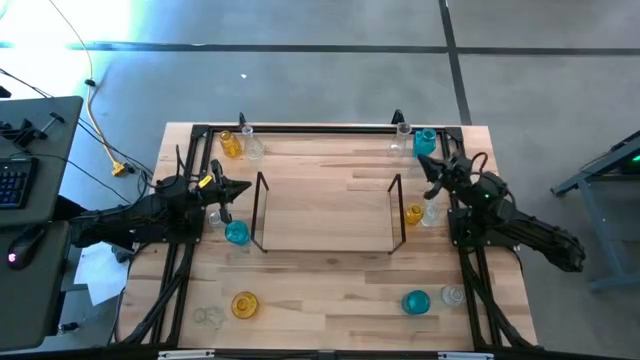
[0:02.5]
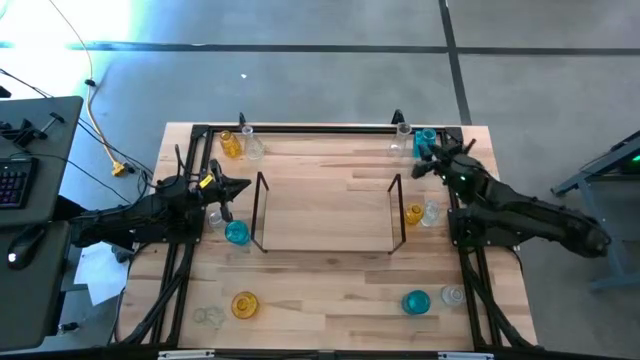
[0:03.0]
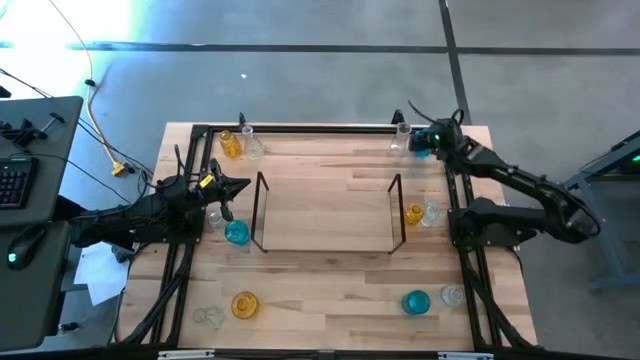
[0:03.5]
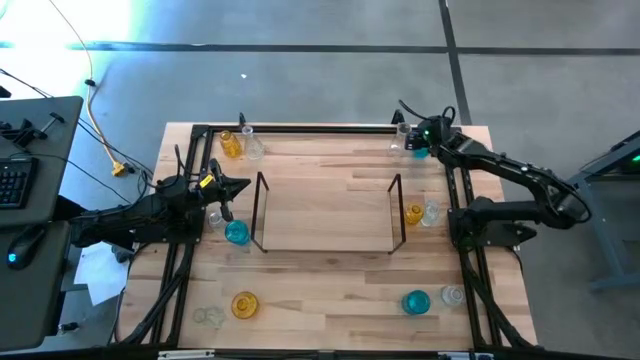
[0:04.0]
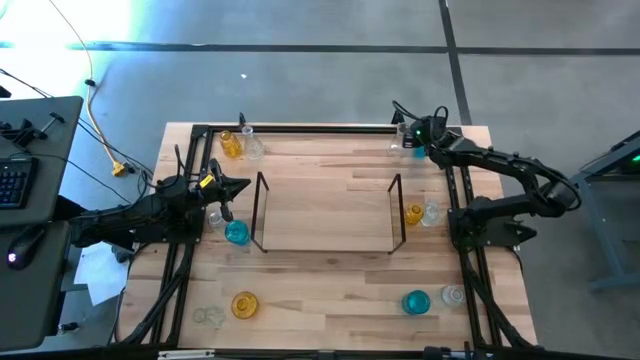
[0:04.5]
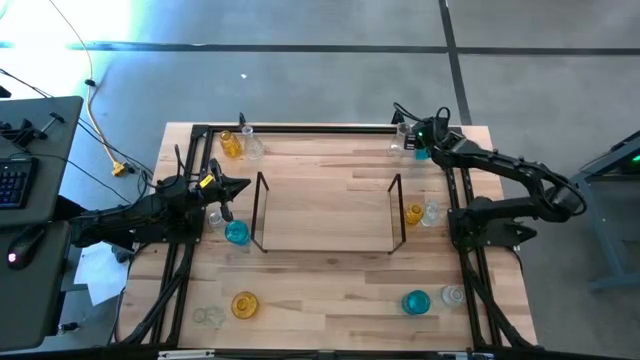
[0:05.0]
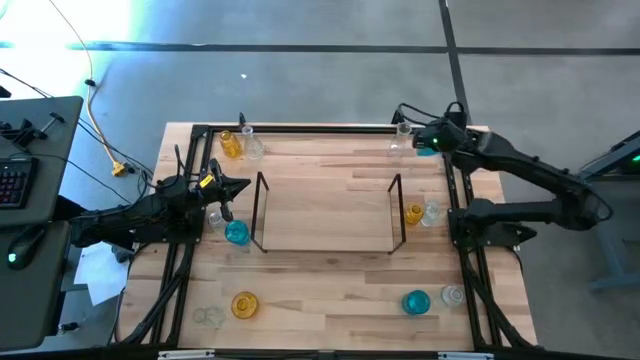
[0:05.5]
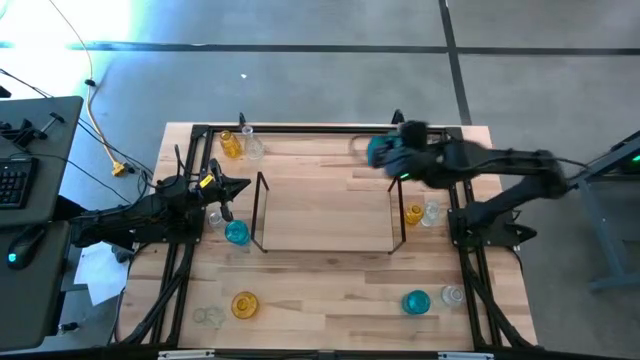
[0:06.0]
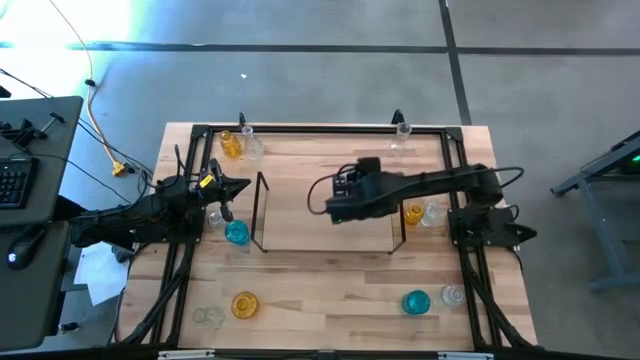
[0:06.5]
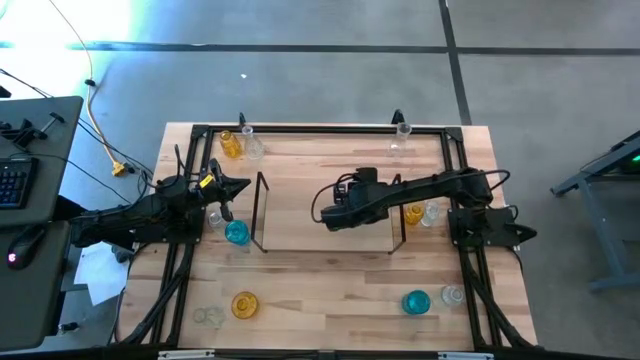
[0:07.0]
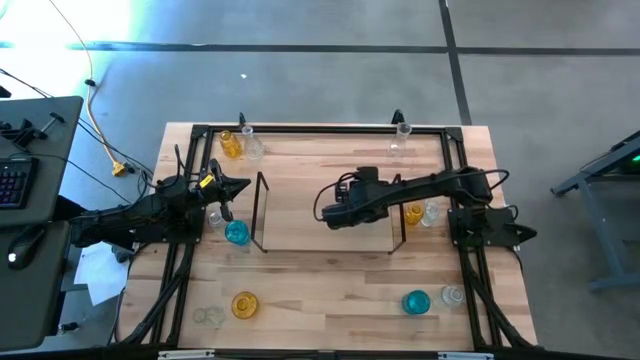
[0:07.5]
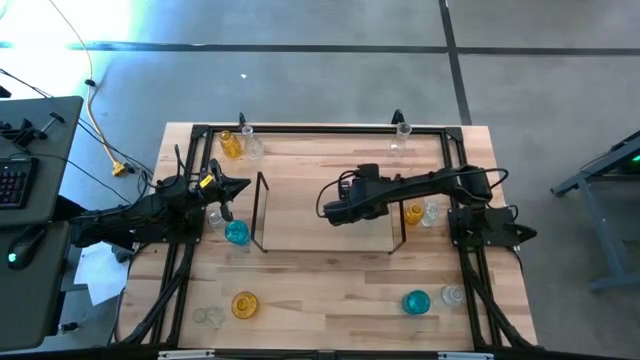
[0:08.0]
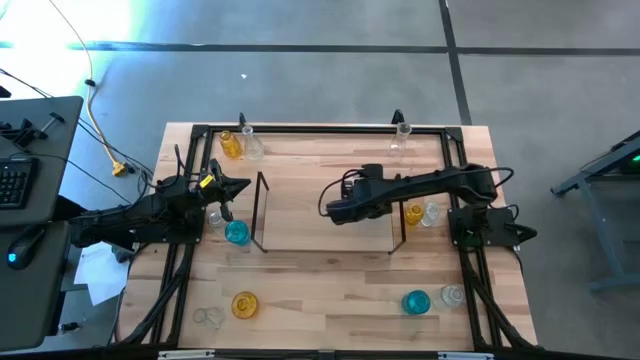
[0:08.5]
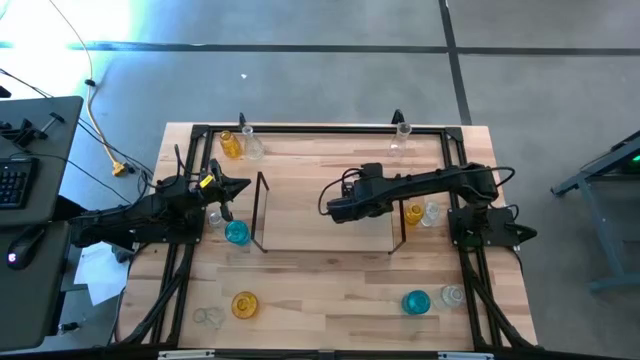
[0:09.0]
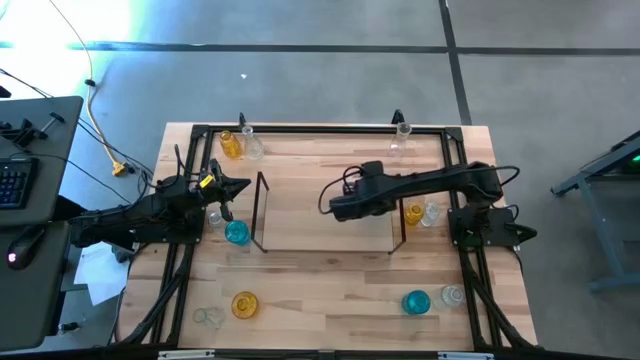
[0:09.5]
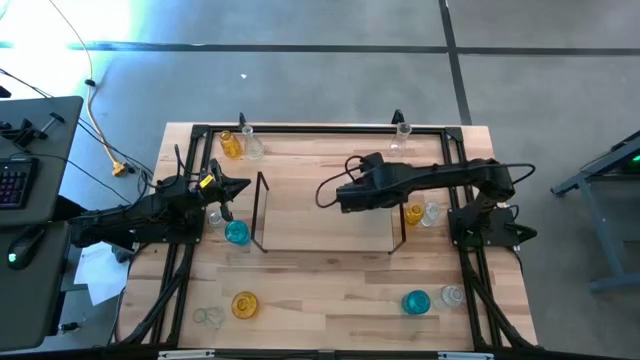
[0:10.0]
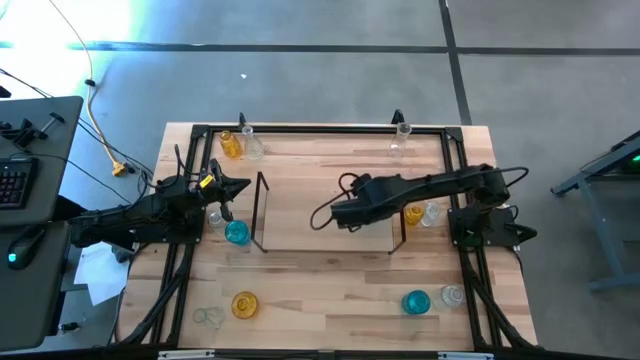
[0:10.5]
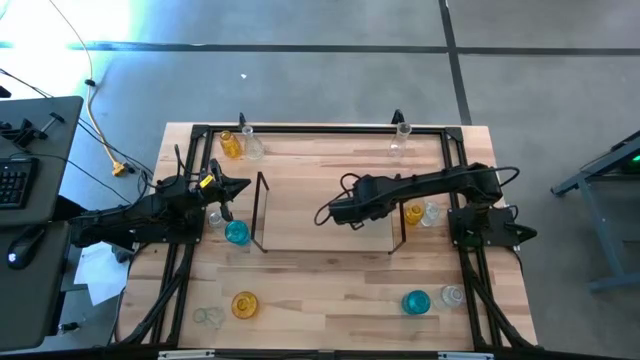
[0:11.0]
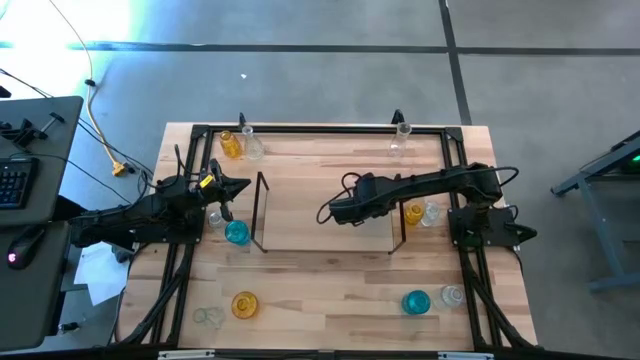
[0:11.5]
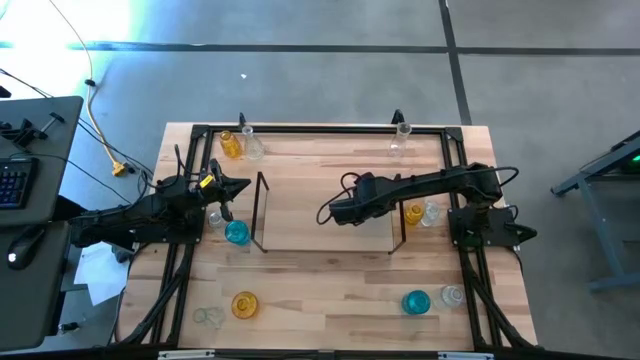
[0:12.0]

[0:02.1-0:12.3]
Task: sort vases onto shelf
Put the blue vase on the shelf

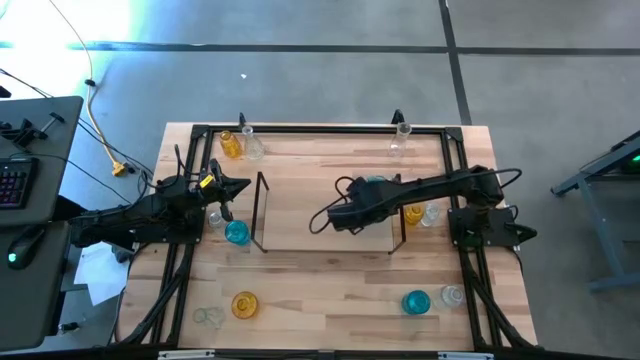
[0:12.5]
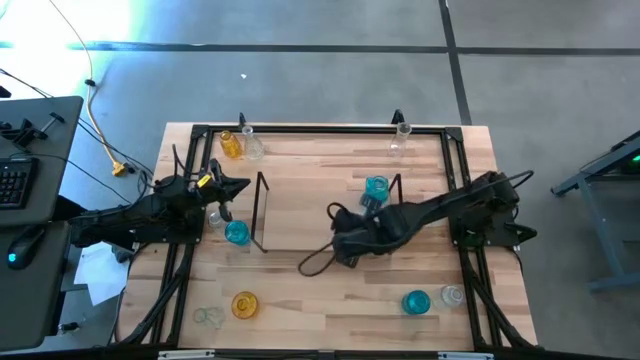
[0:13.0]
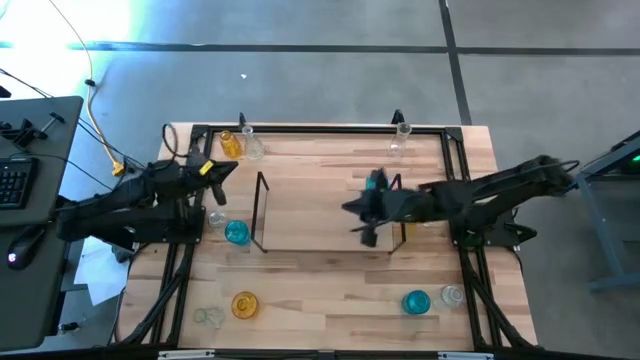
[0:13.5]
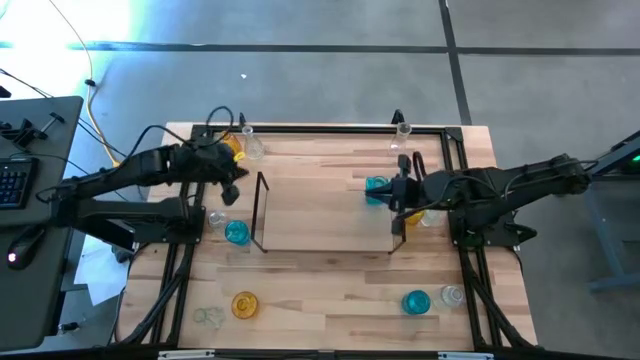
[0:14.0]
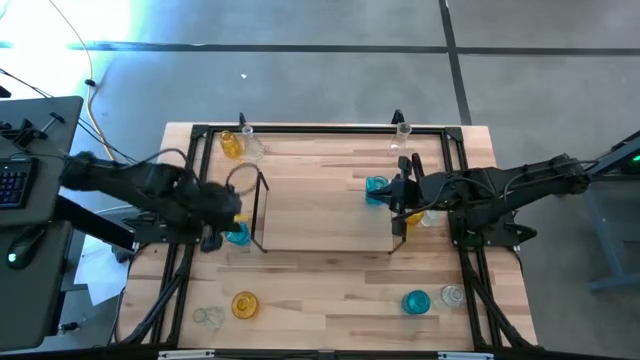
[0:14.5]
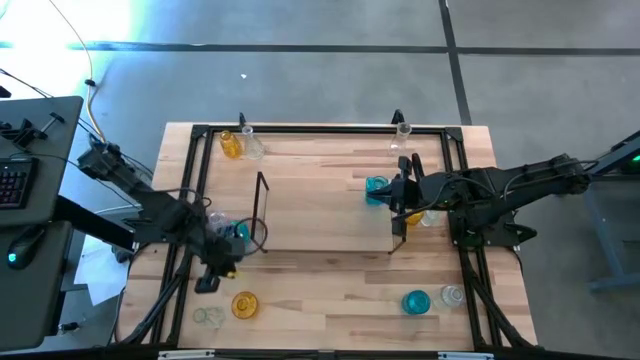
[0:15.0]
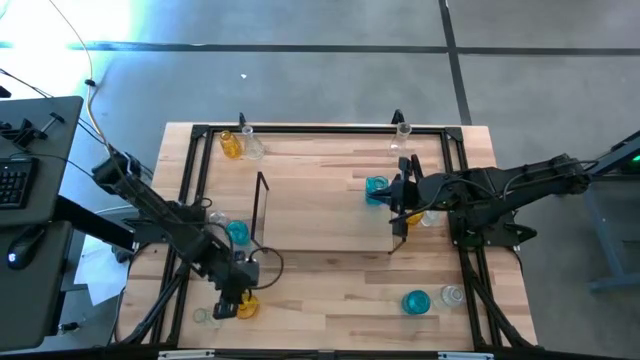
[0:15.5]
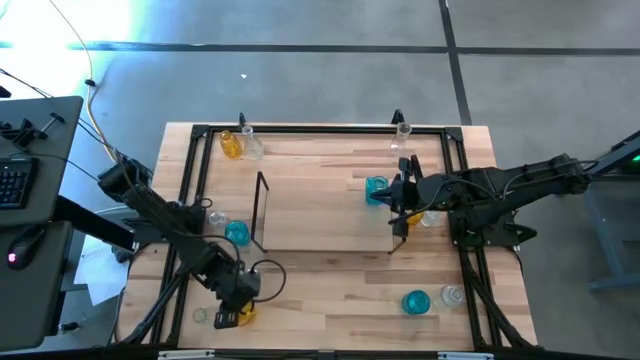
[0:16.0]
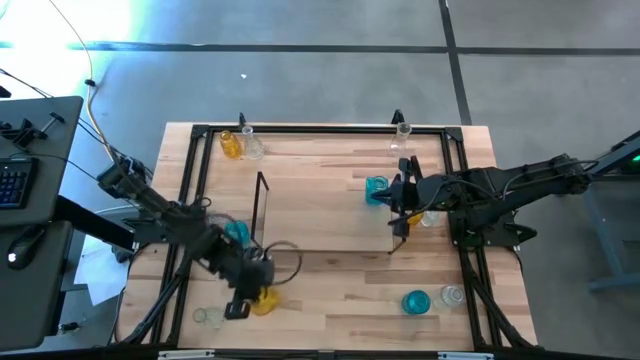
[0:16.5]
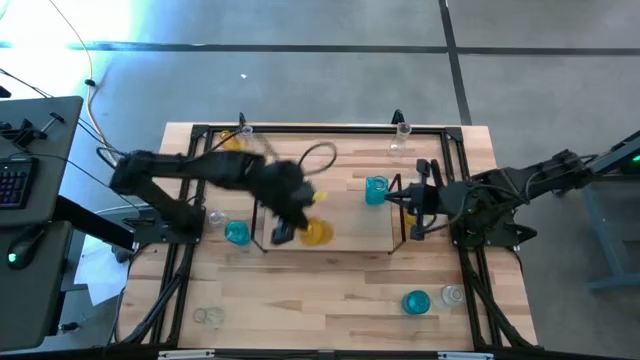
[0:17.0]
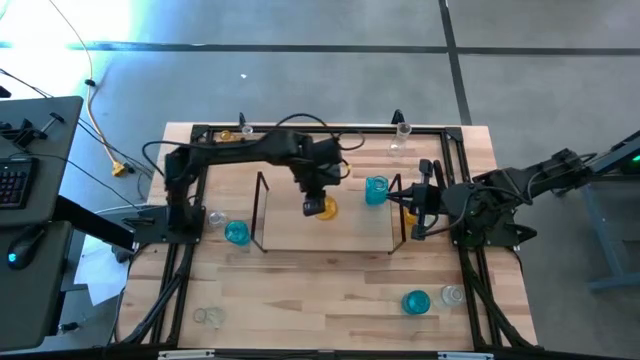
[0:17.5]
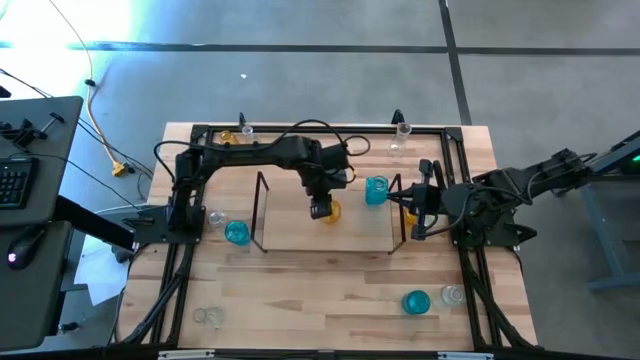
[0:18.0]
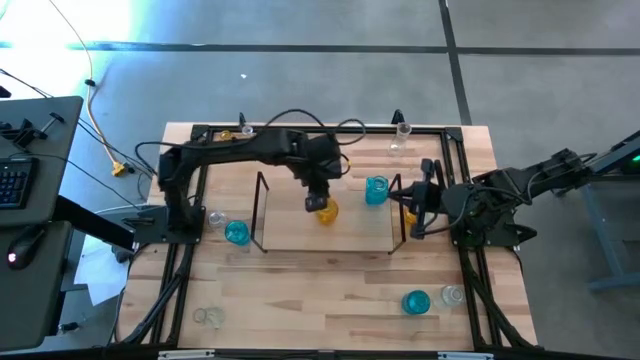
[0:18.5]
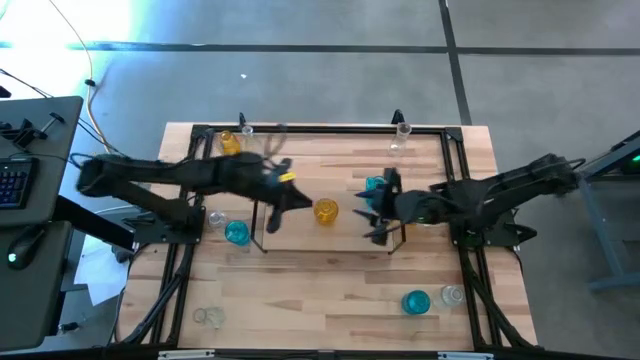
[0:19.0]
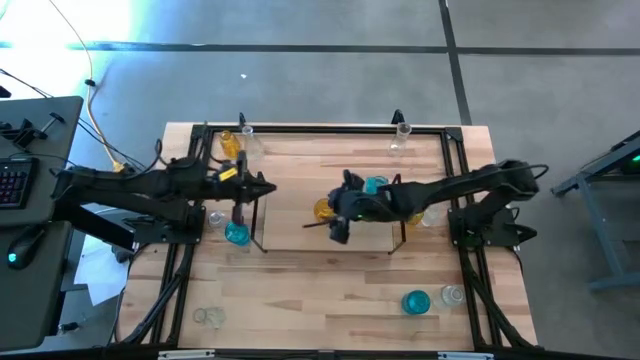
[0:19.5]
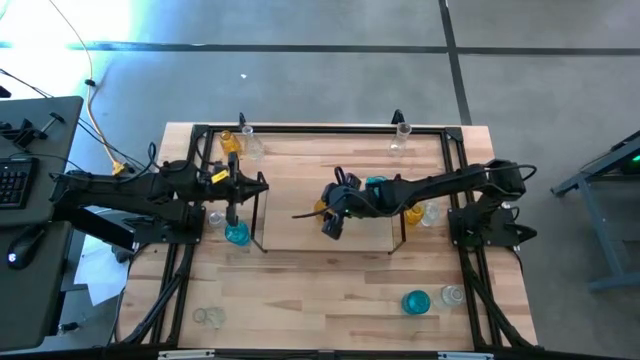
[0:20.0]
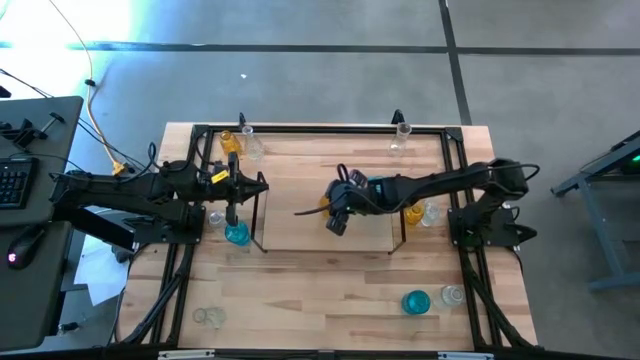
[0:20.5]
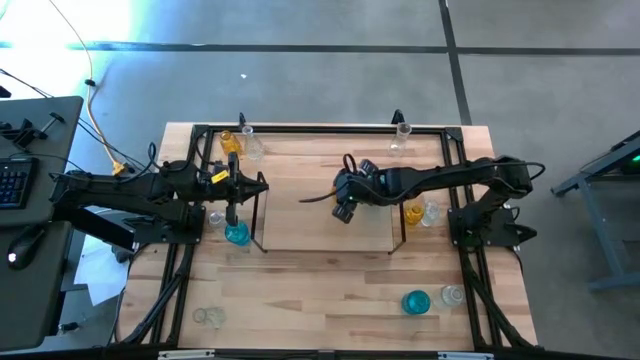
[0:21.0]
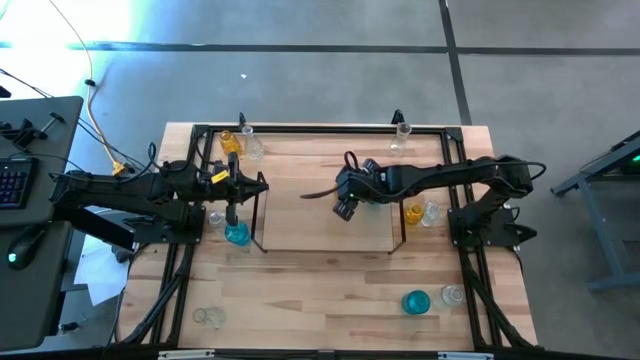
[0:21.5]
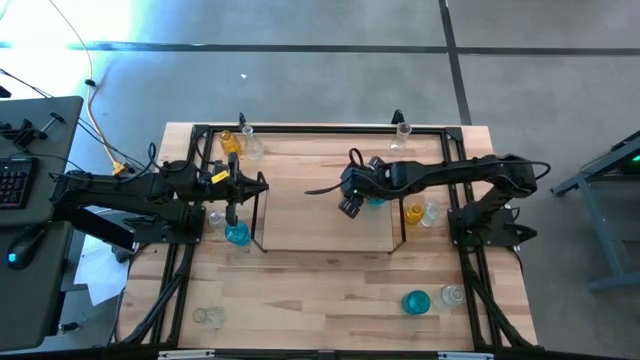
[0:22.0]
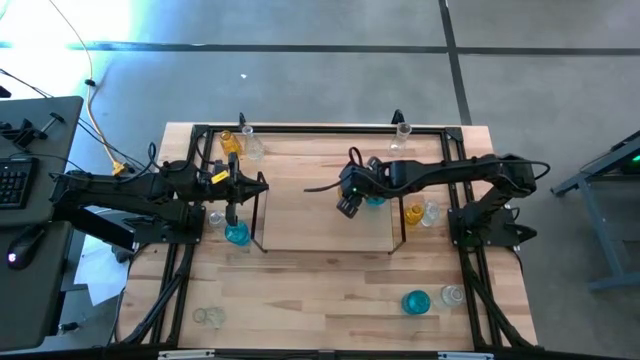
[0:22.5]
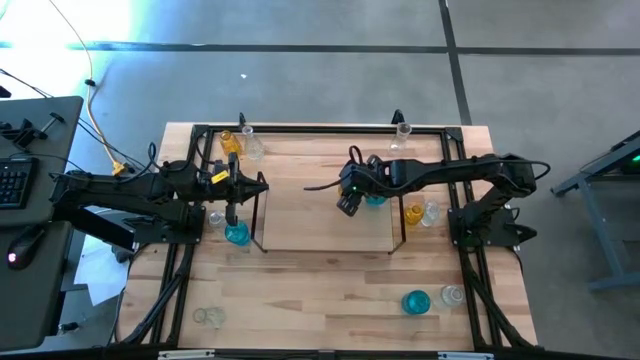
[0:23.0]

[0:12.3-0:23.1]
Put the yellow vase on the shelf
